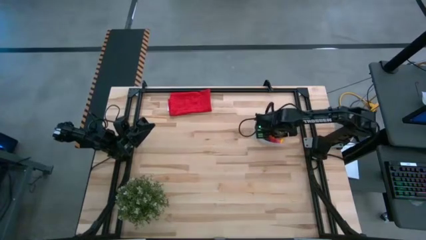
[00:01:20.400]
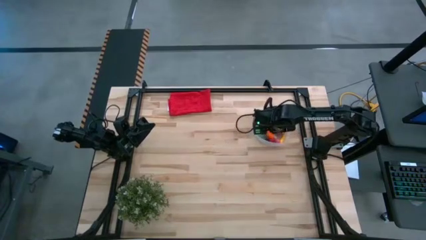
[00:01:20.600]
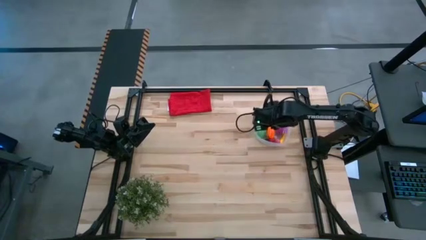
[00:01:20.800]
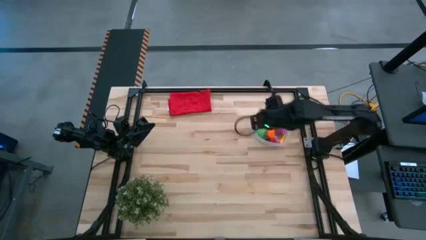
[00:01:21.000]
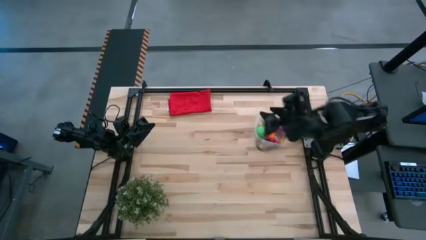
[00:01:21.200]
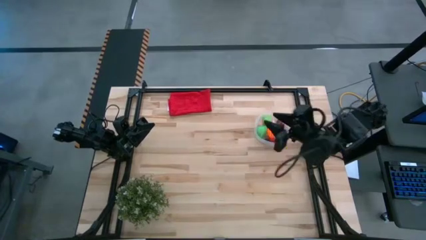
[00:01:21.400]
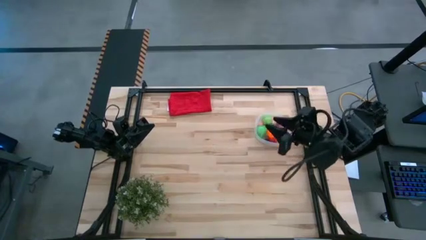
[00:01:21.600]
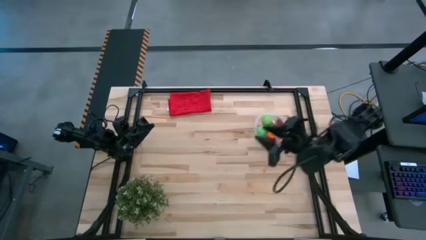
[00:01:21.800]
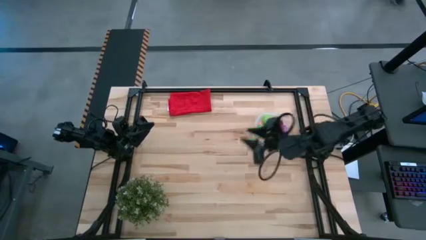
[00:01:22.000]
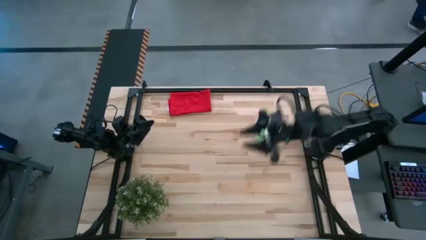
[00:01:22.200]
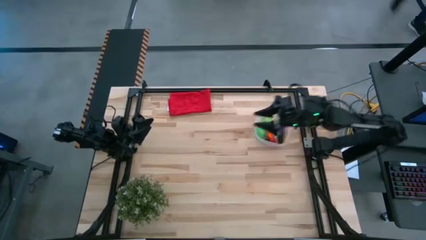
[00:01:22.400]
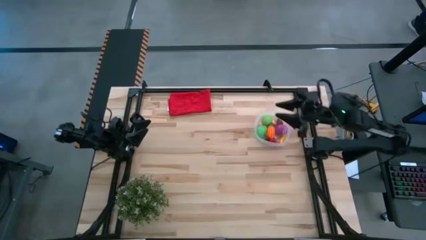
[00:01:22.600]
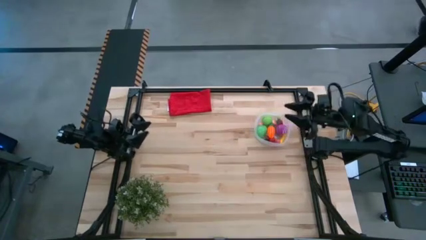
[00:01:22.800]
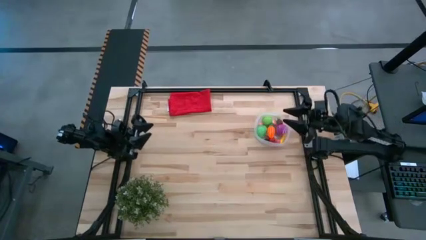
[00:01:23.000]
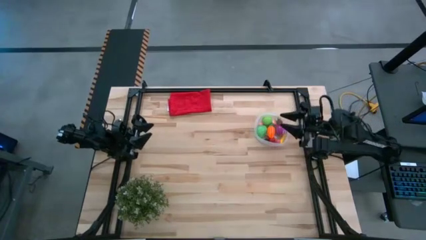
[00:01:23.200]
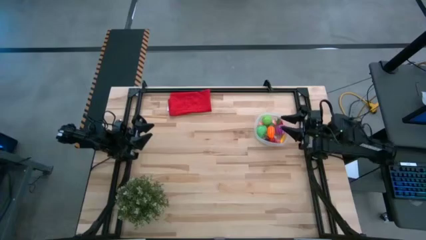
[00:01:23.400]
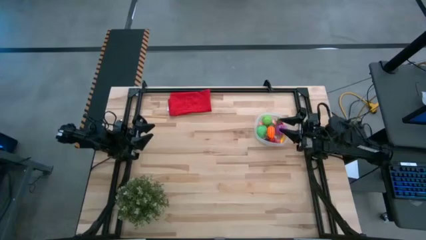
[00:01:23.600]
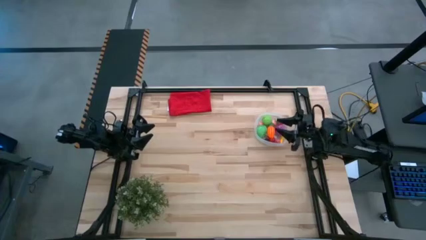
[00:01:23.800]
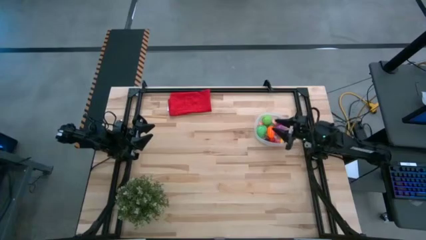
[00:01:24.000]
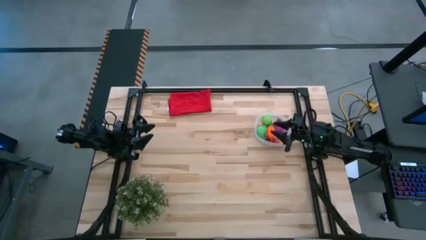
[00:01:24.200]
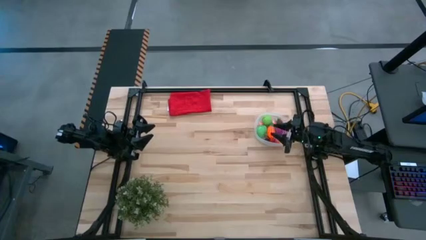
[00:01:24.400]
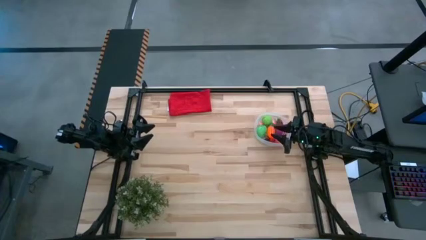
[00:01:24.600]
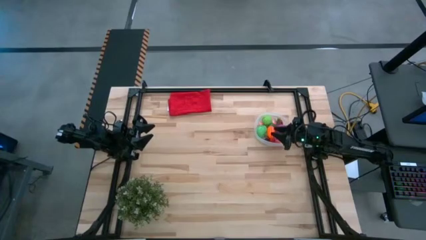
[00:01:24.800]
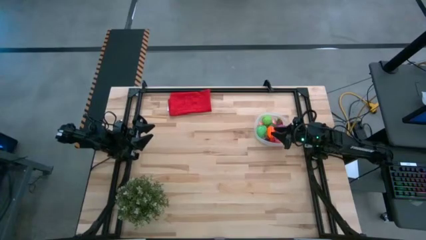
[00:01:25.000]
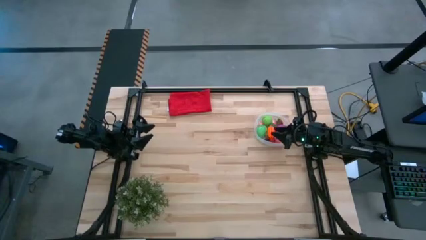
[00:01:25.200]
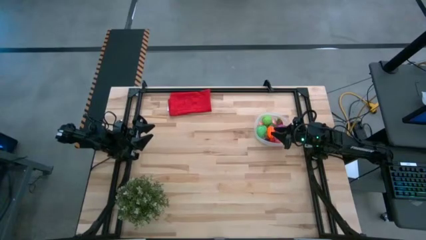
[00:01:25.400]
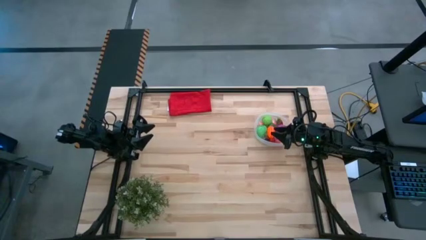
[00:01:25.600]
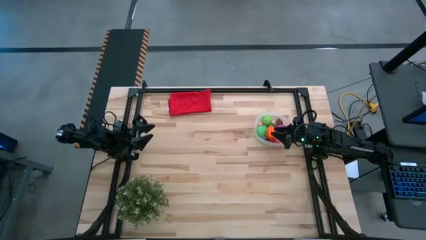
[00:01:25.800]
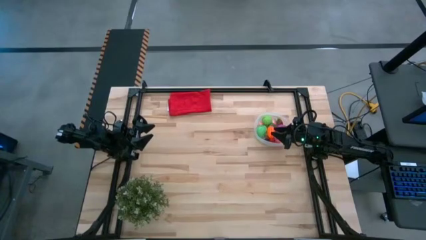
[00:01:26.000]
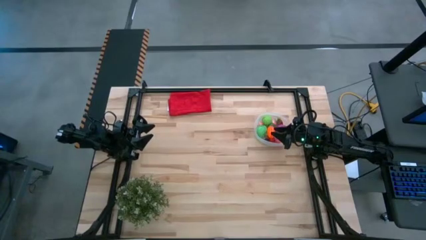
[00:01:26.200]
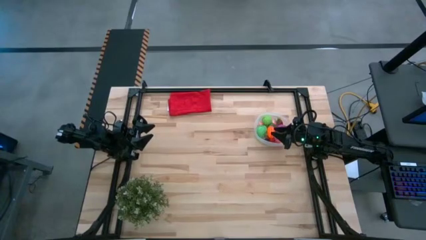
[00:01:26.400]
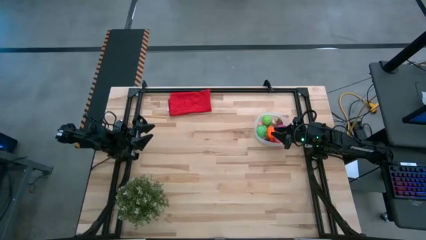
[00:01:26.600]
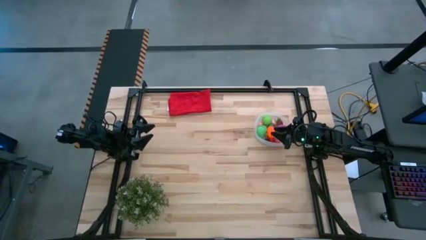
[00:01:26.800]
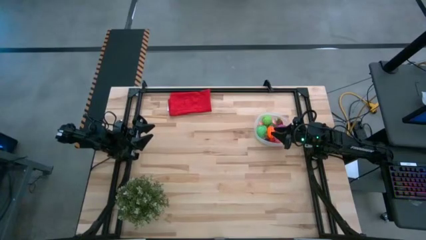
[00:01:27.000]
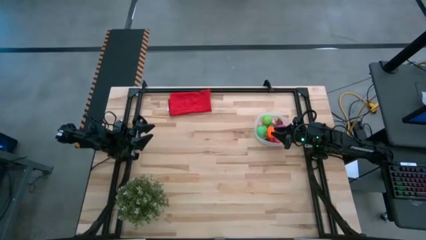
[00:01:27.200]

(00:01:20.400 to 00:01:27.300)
Task: Pick and placing Produce into tupperware
Return to Home Position

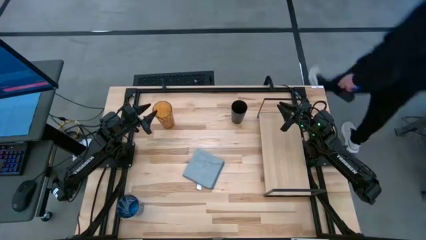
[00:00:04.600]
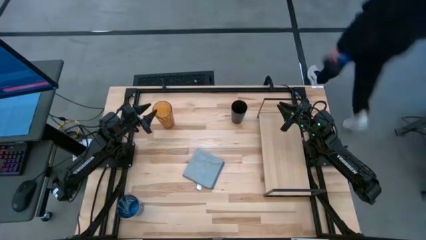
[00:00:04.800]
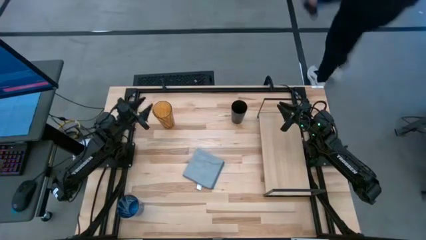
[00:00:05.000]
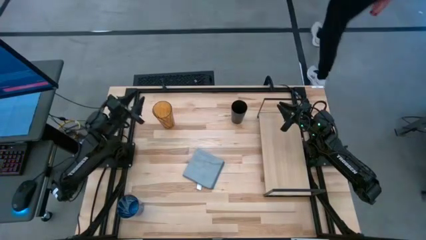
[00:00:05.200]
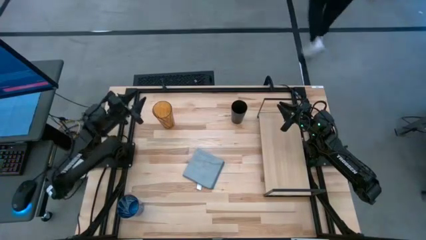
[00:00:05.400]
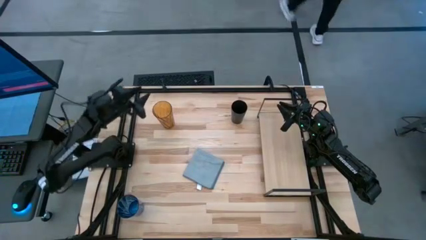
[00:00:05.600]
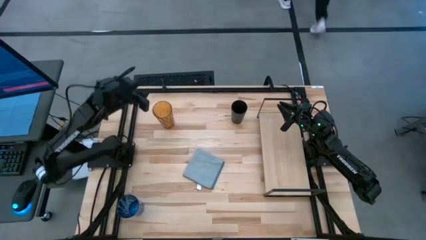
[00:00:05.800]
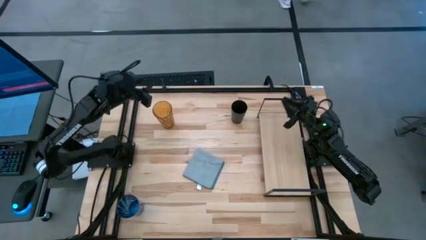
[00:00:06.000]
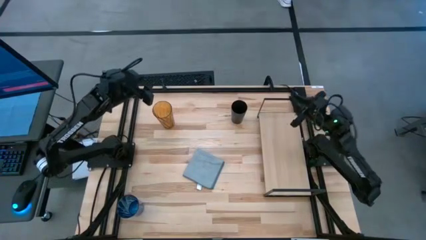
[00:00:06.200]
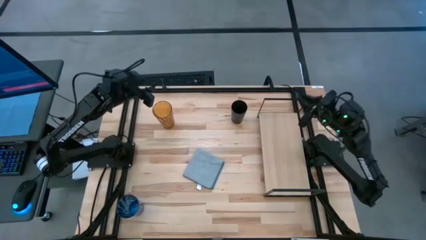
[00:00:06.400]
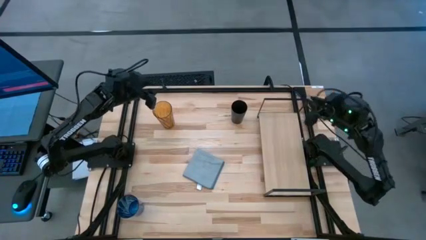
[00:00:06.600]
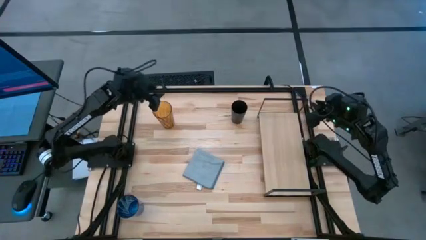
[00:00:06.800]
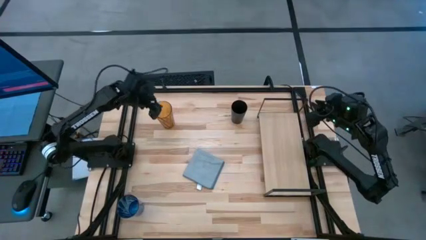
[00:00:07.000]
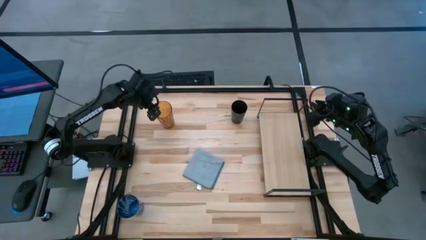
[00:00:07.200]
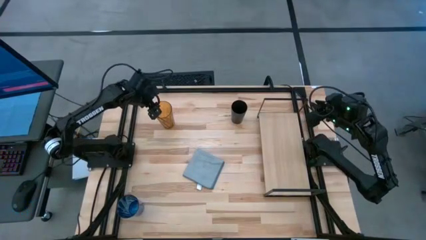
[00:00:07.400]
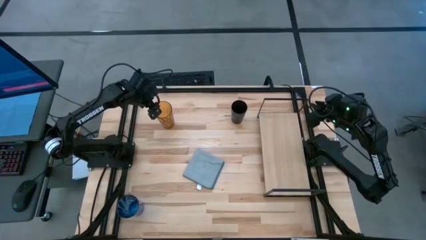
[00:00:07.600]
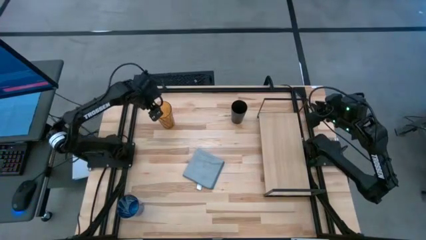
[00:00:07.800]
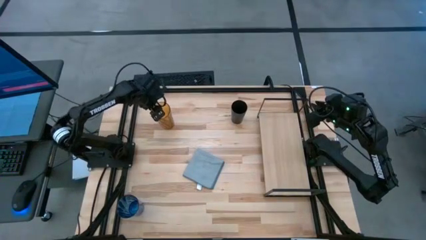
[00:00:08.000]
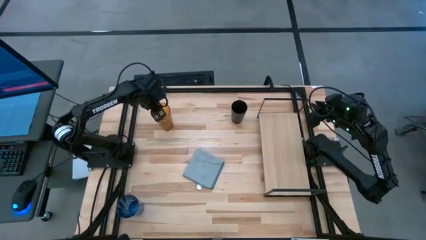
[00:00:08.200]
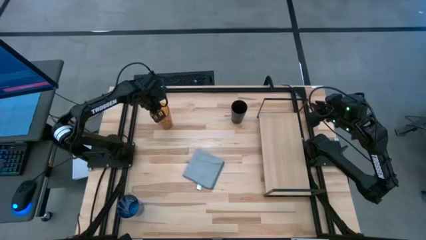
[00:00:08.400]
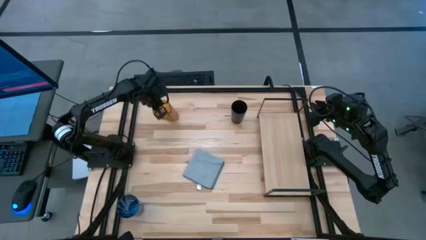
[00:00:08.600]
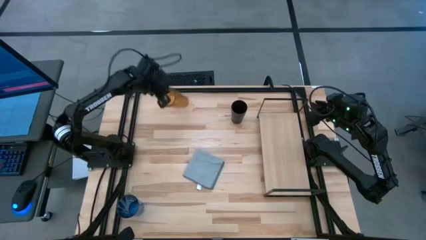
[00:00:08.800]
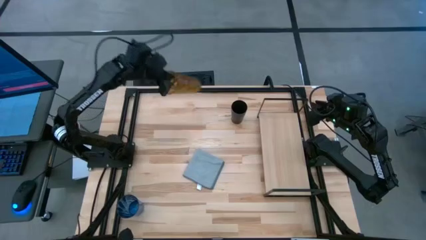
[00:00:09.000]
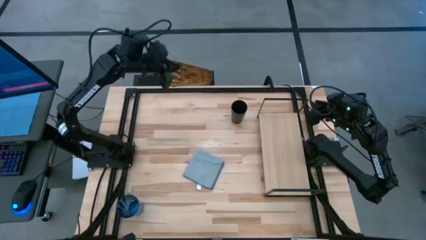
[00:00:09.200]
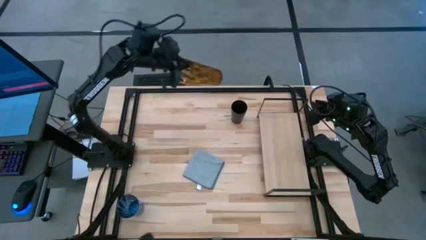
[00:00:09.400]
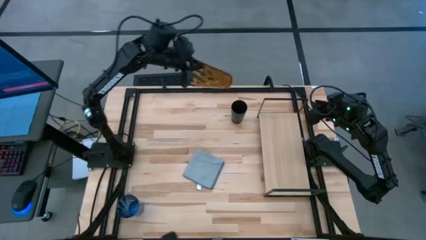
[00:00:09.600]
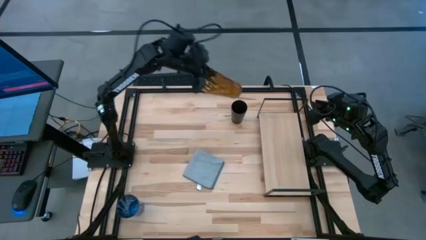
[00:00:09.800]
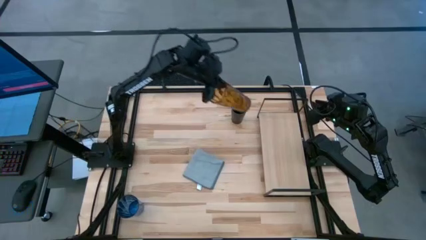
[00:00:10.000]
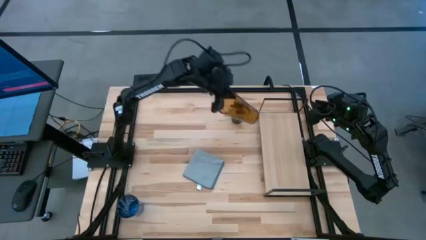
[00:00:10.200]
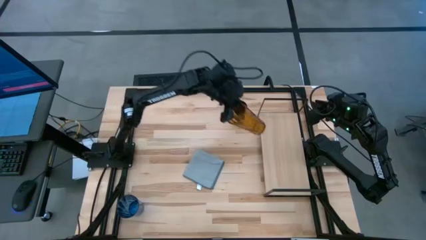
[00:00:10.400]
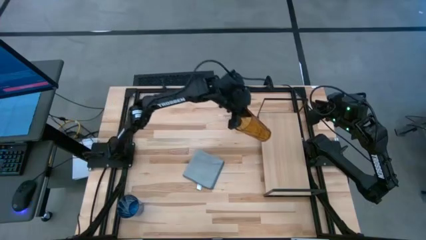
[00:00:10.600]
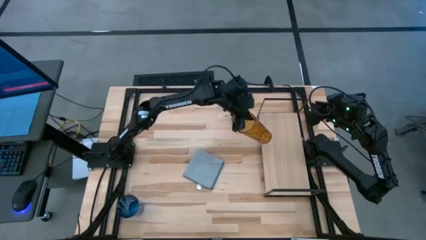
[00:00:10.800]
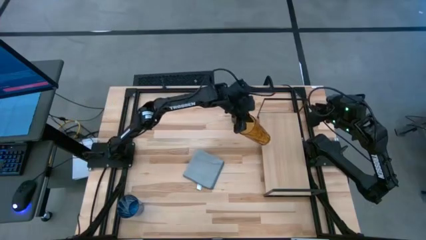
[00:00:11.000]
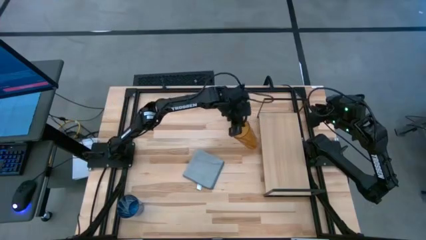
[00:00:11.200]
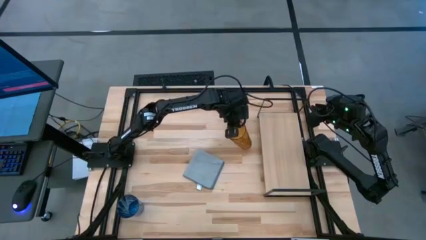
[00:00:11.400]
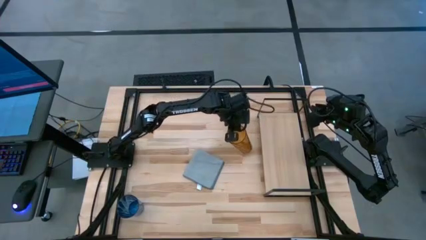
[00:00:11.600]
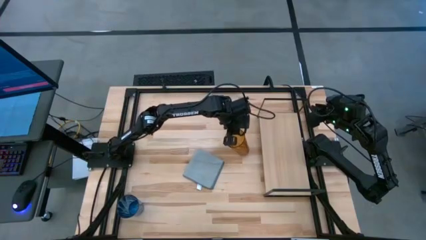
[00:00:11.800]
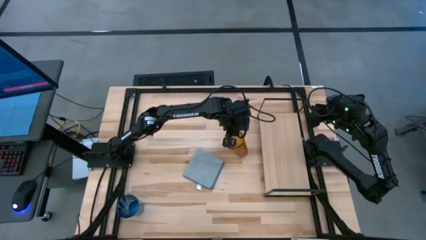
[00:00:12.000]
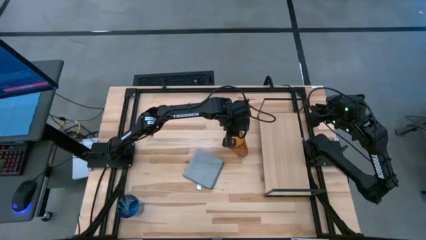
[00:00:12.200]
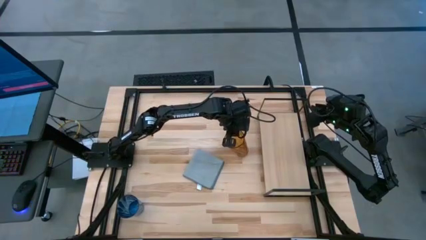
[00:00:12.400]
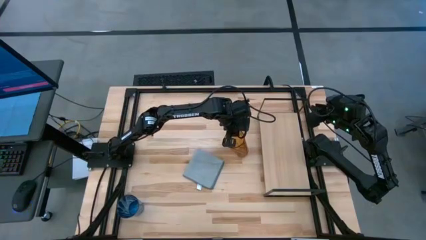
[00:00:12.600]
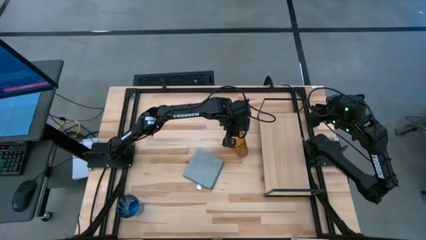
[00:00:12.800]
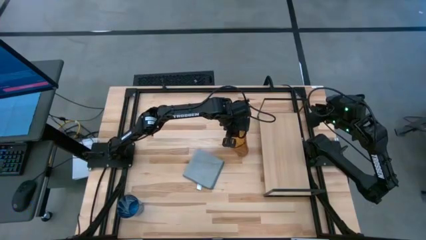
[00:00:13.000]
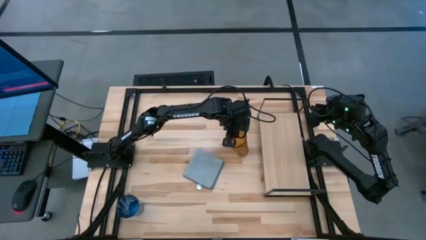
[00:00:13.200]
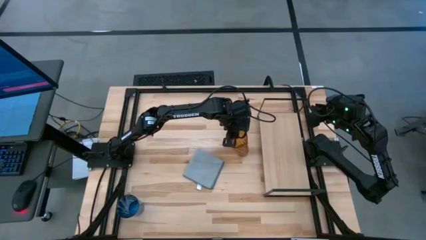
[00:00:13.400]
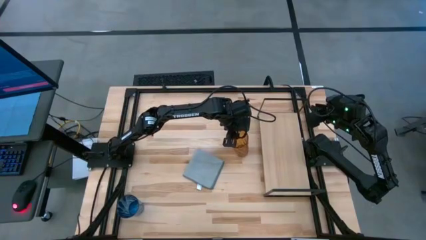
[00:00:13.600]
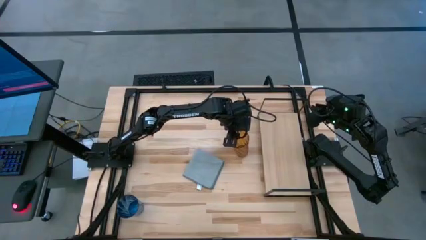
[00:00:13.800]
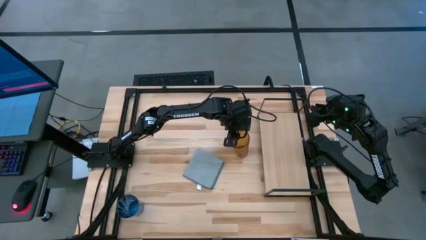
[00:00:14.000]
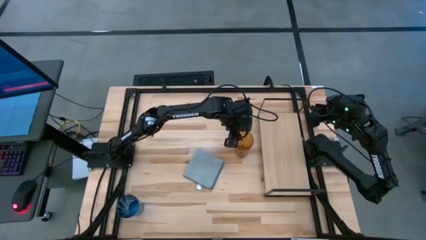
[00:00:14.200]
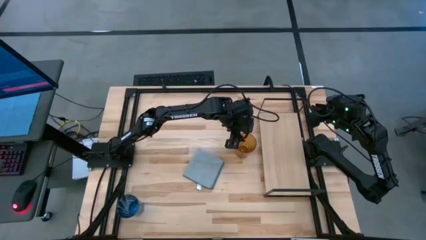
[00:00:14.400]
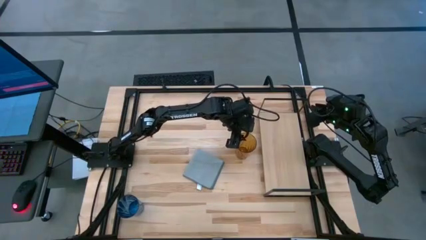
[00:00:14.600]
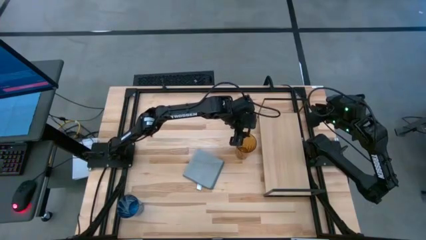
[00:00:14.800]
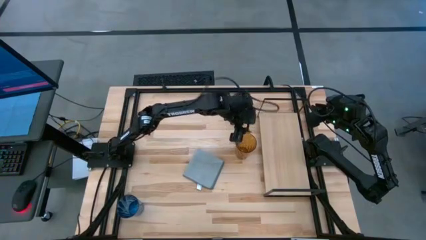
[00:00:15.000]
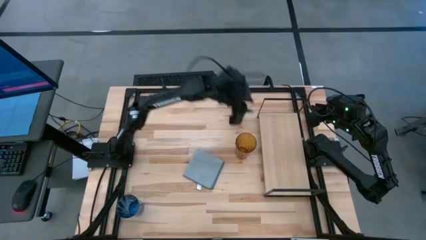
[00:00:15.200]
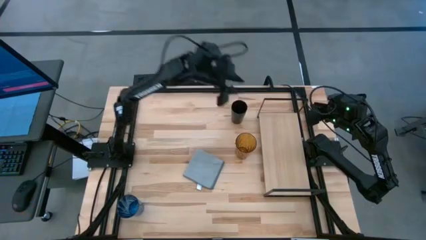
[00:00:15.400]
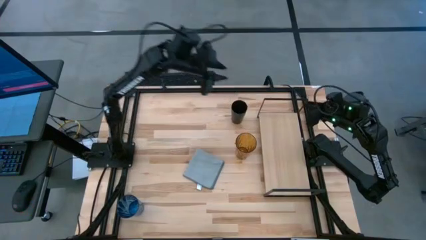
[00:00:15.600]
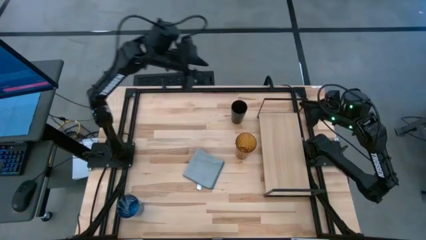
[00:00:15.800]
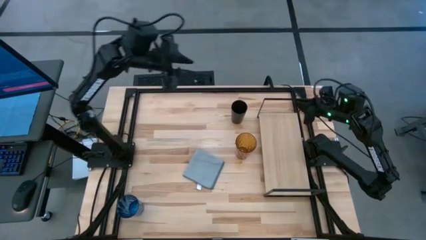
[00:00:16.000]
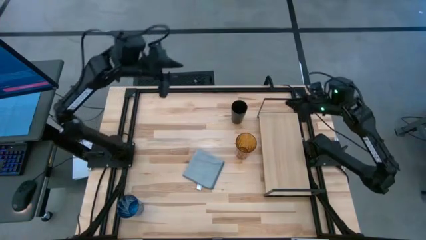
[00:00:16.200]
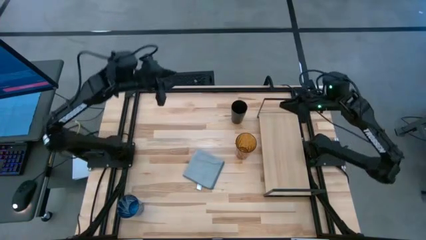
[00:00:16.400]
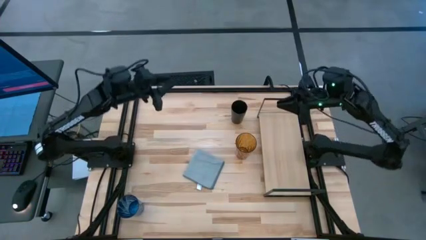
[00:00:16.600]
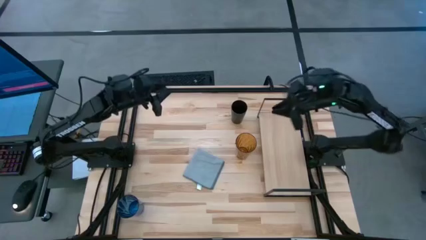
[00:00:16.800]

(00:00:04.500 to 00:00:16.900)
Task: Stack small to large cups/mugs on shelf
Put the brown cup on the shelf
